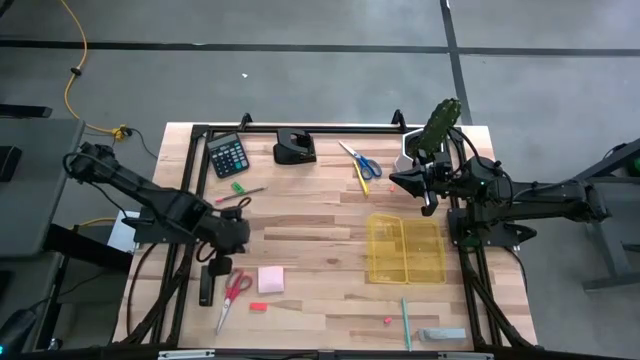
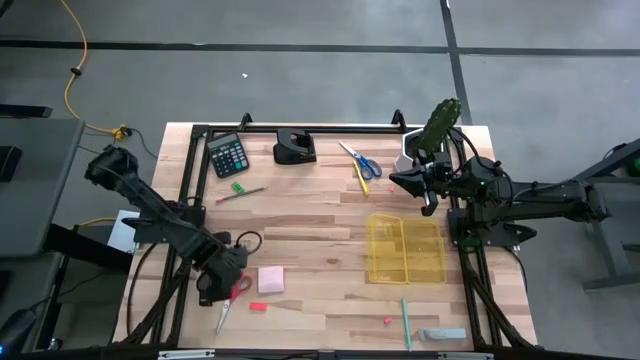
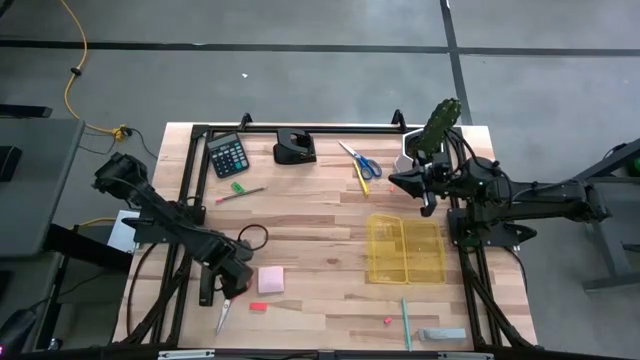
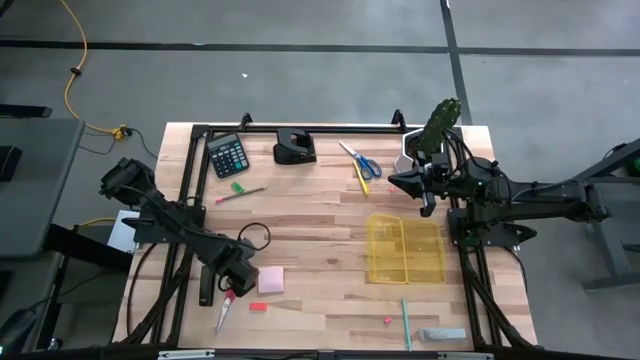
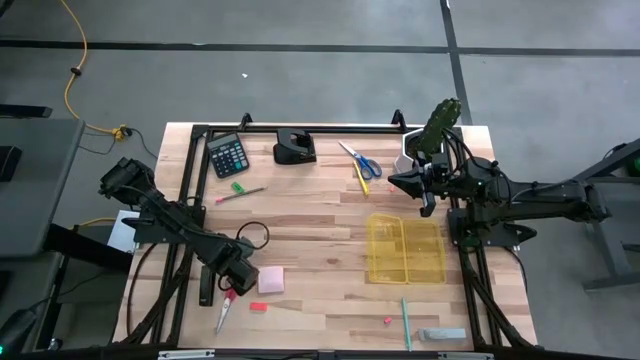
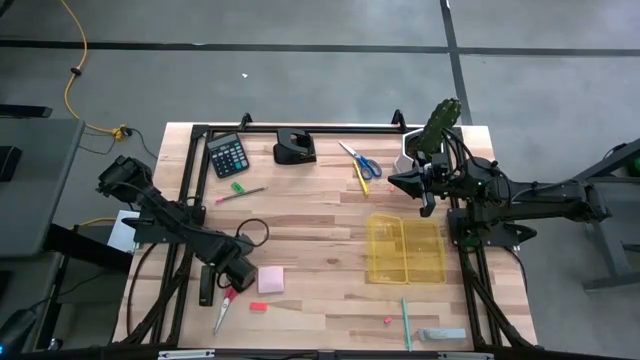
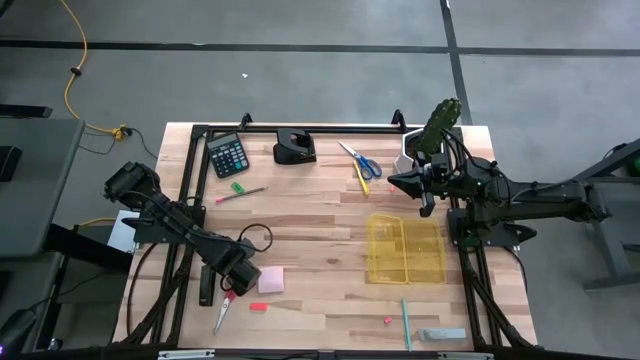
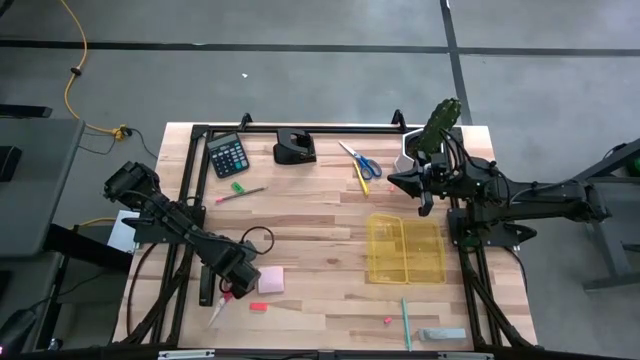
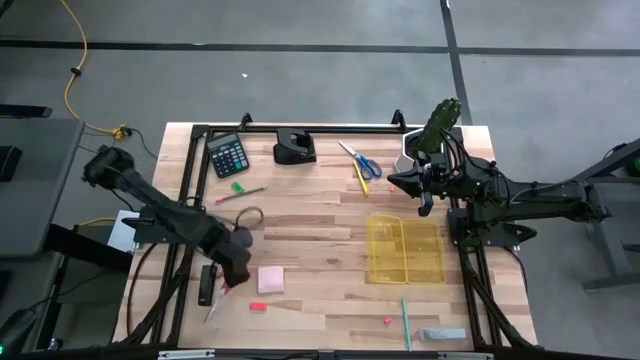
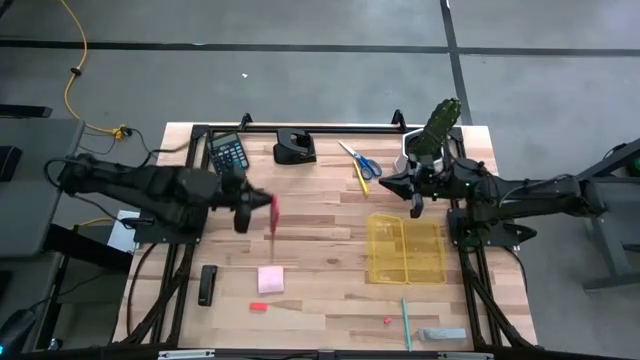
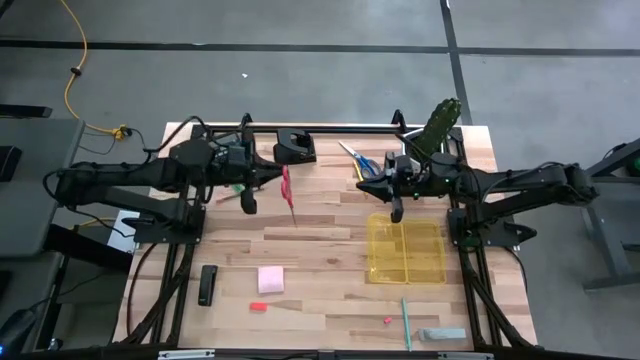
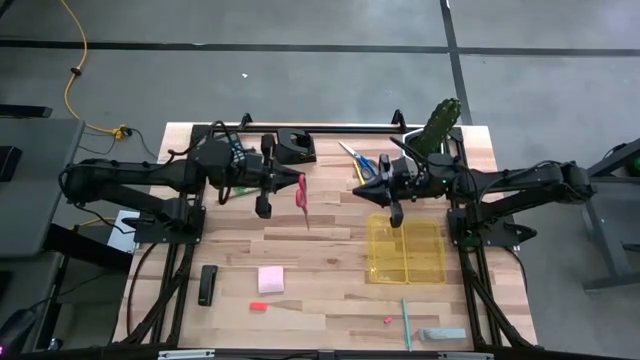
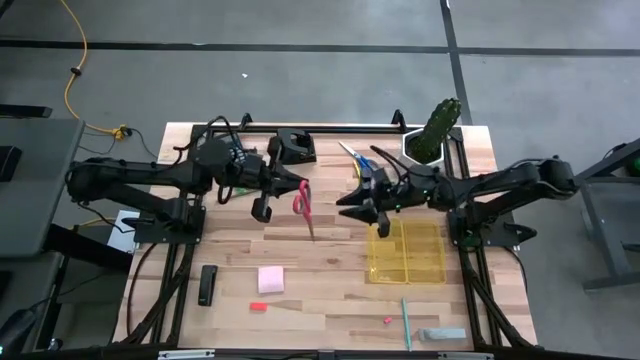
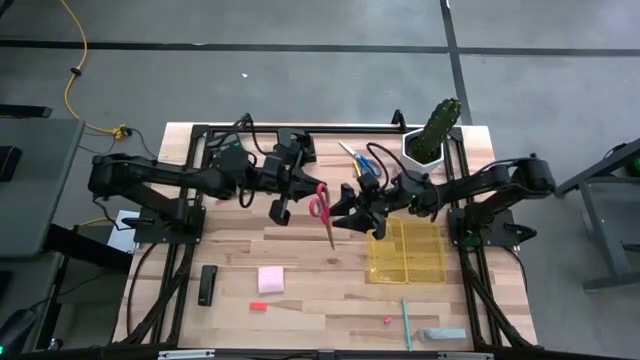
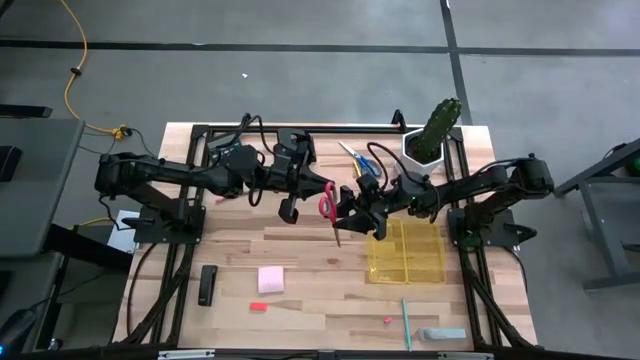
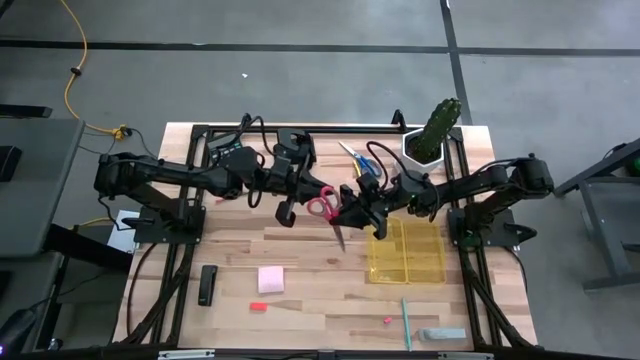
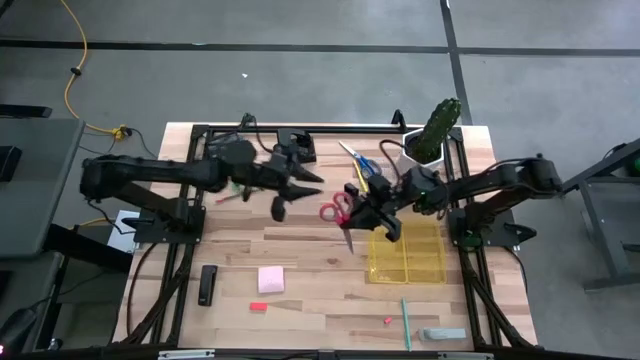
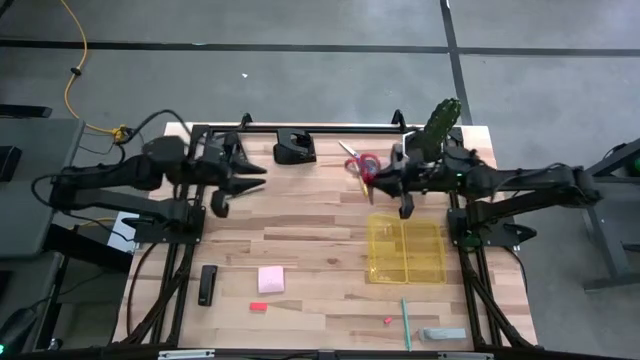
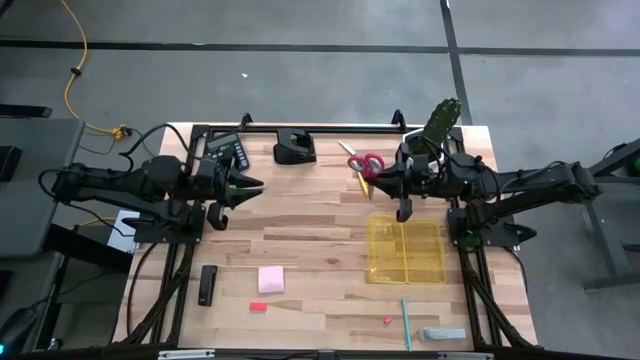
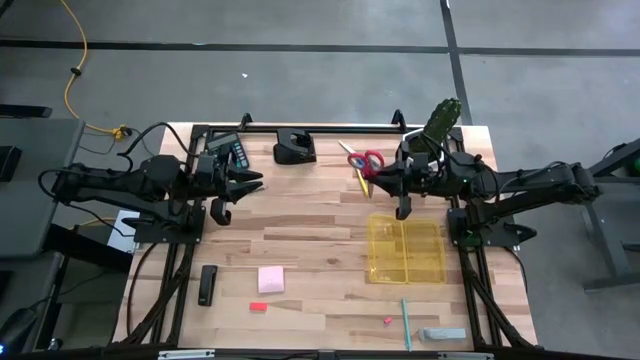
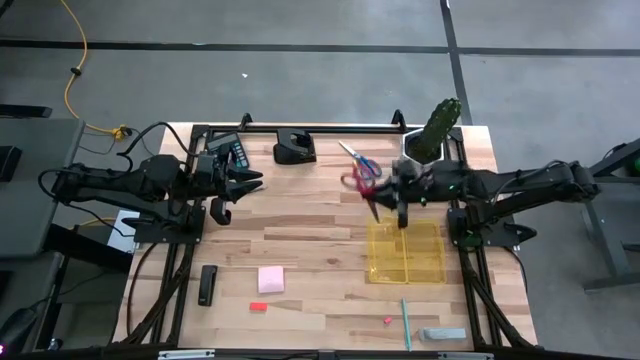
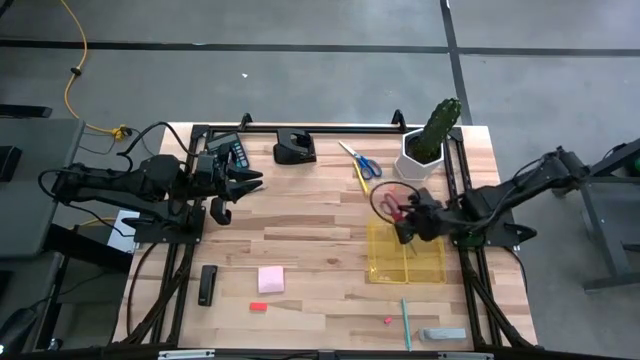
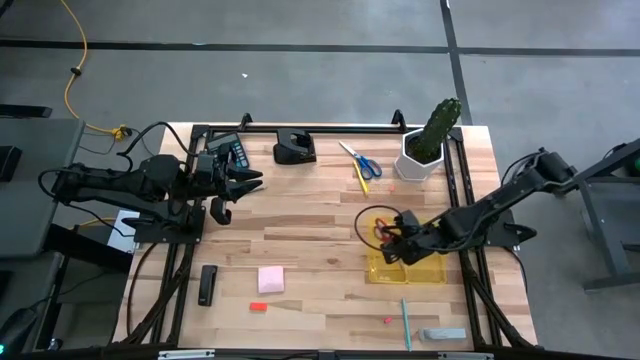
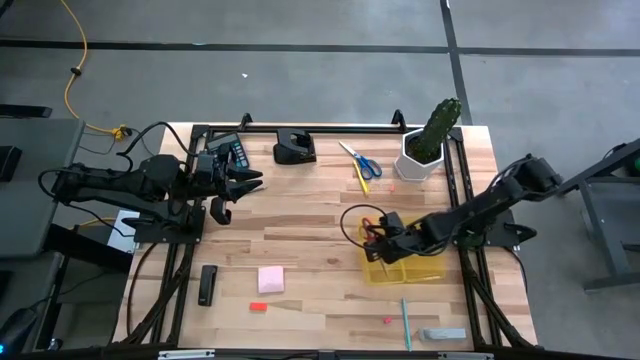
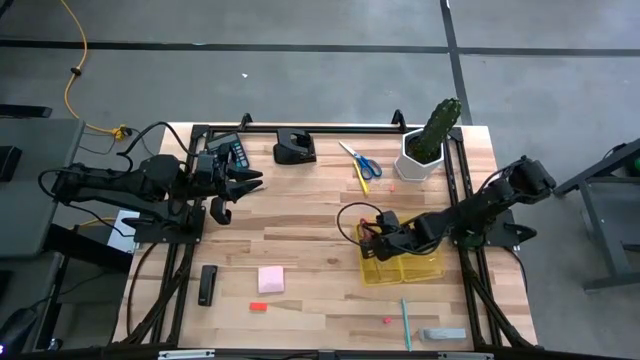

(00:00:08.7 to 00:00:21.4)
Task: Pack school essentials
Put the red scissors into the yellow box

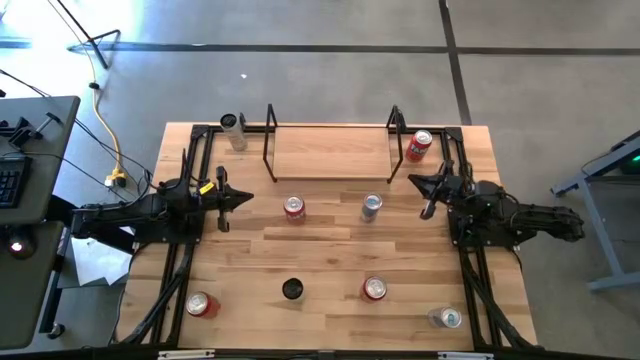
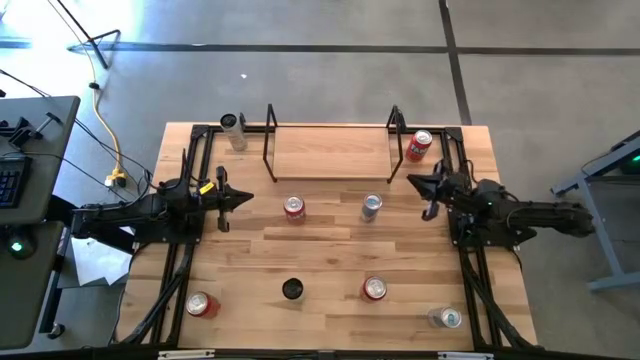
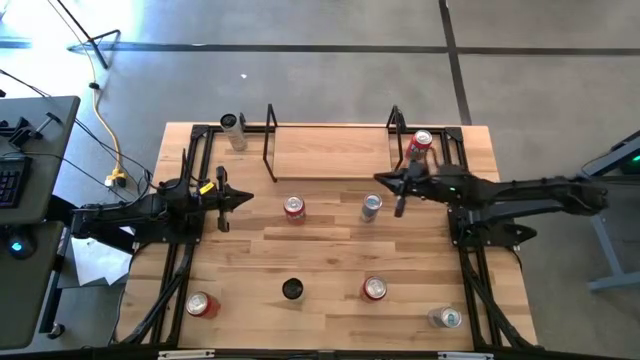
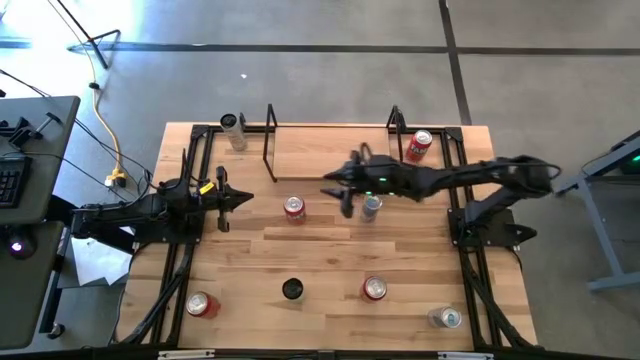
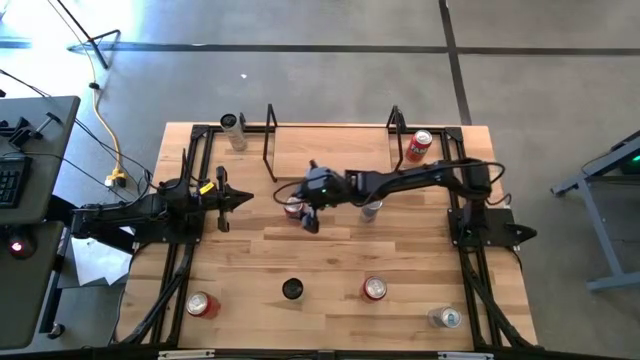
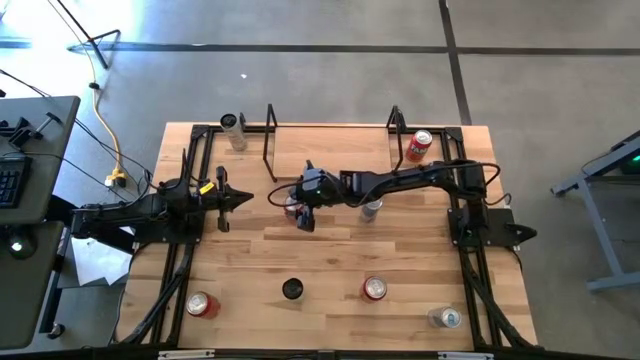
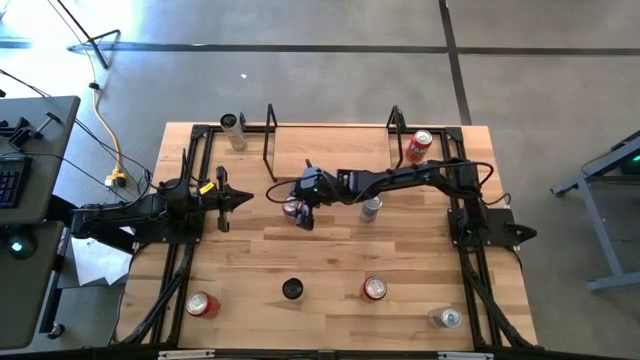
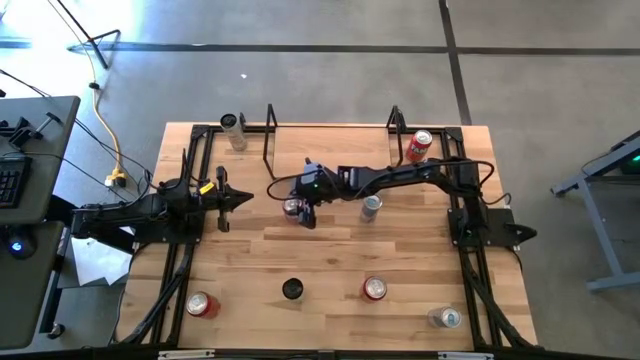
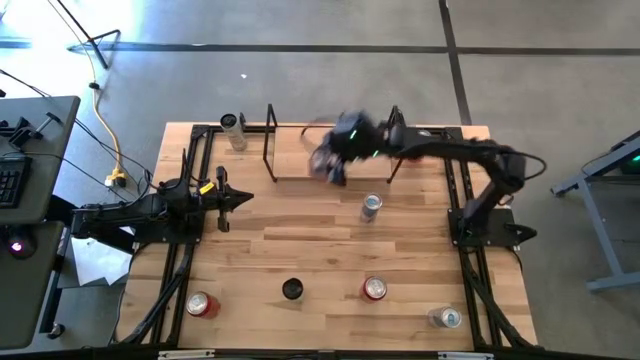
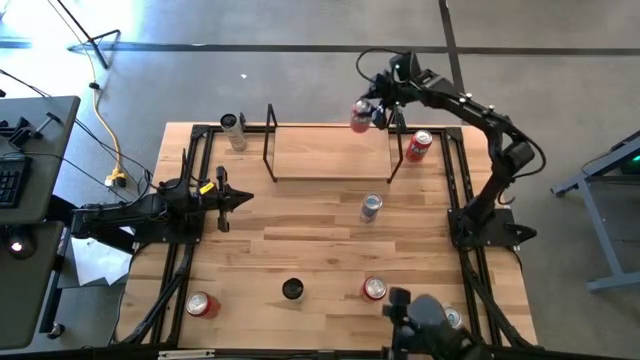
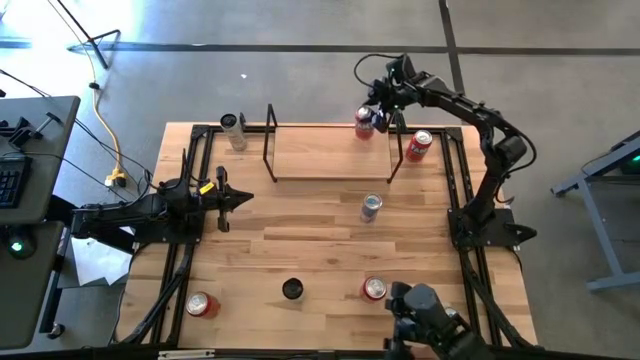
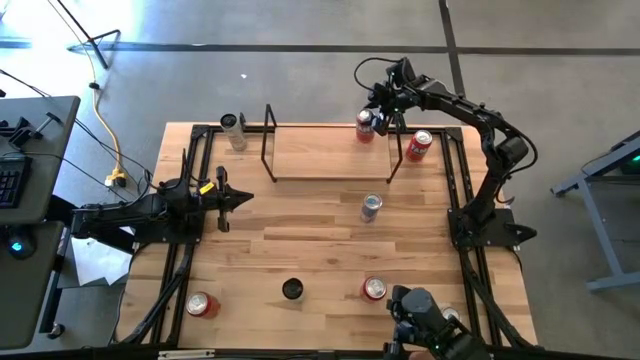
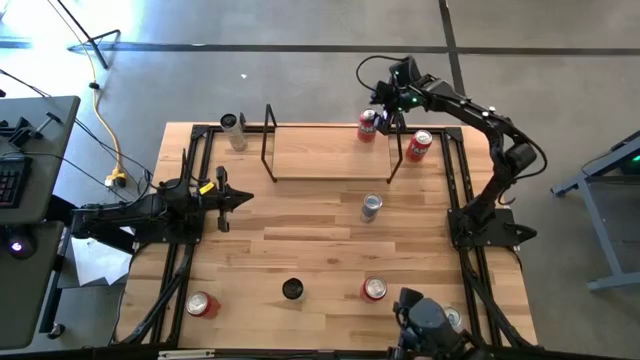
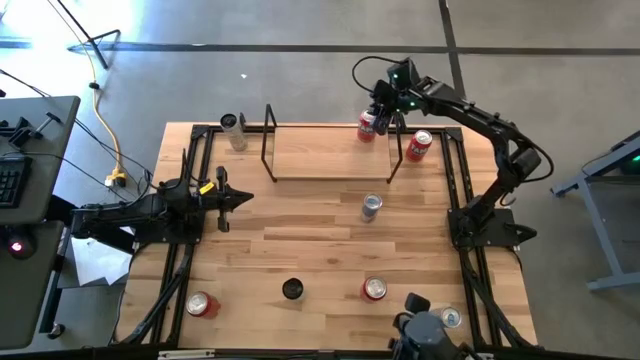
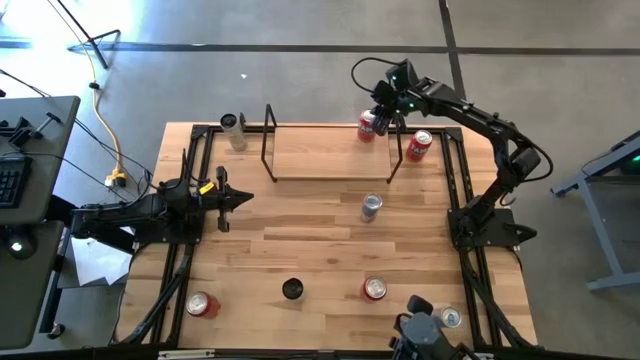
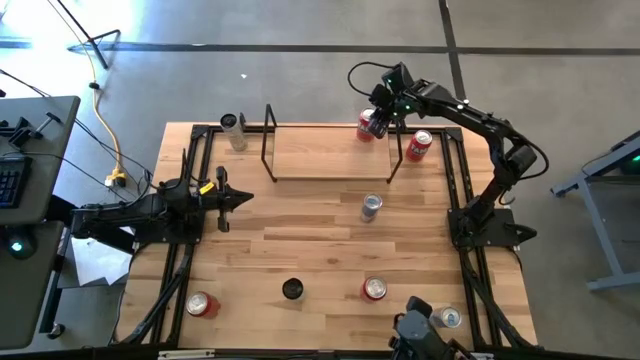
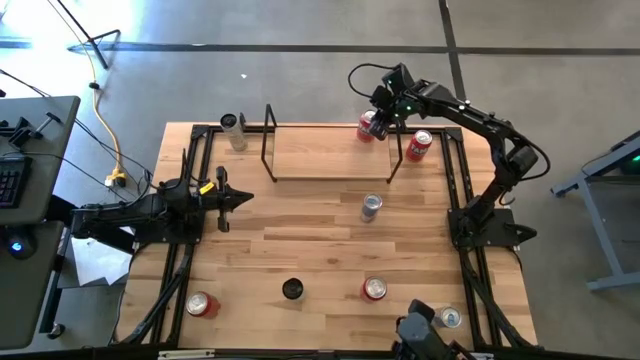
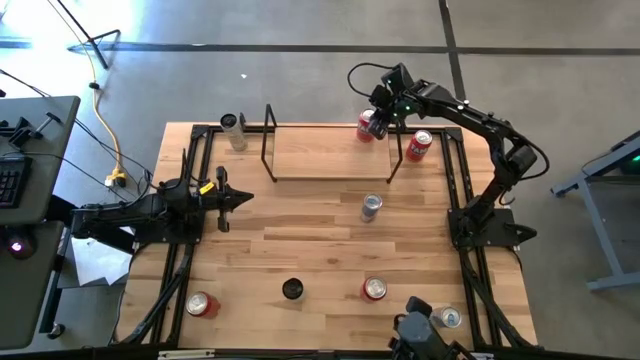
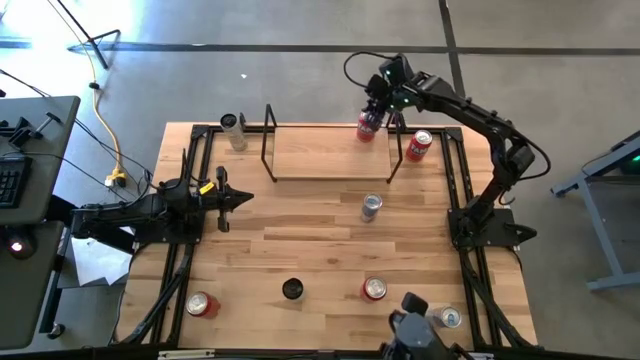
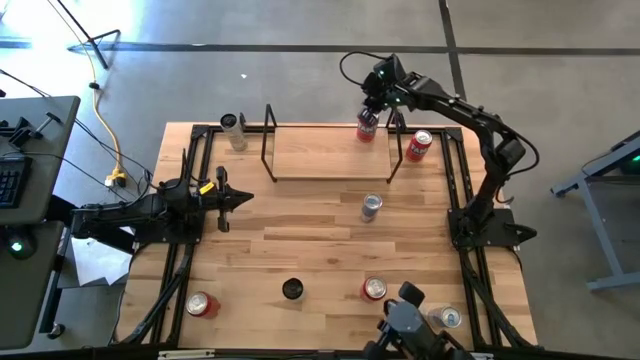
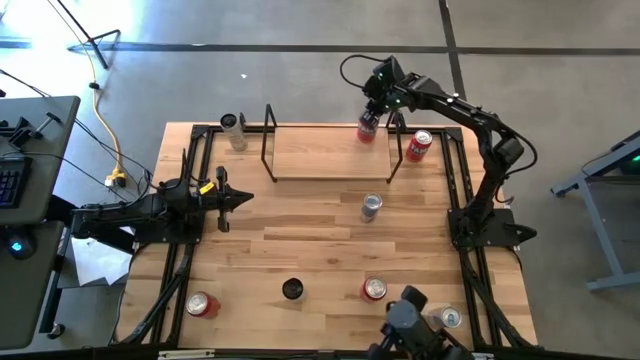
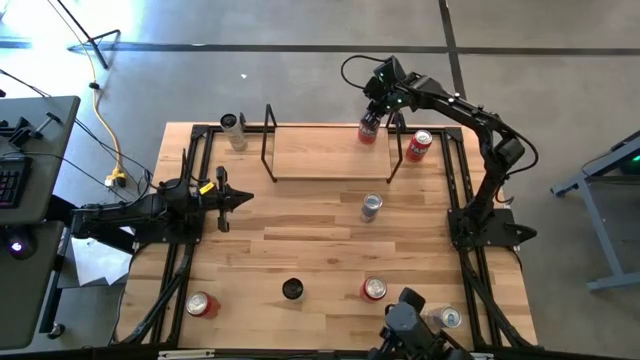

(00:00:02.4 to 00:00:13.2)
Task: Place canned beverage on shelf
Put the bottom red soda can on the shelf
